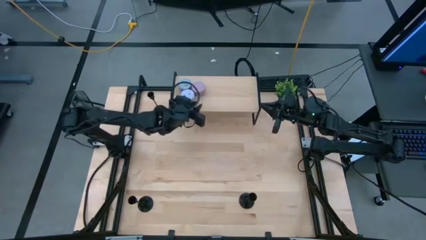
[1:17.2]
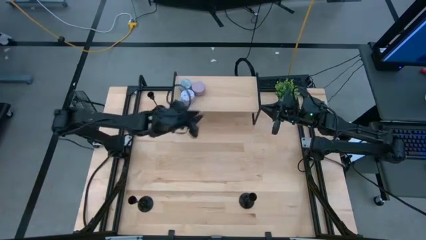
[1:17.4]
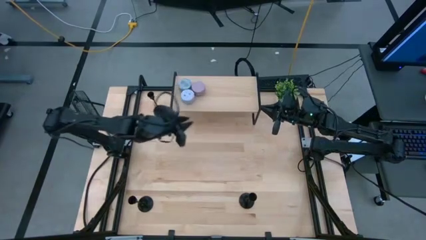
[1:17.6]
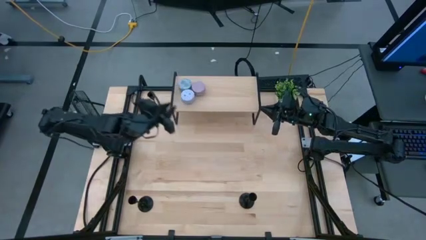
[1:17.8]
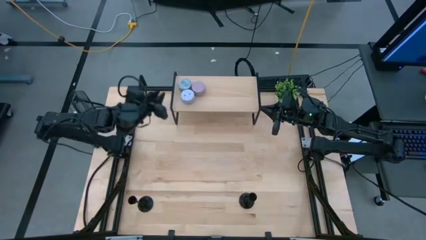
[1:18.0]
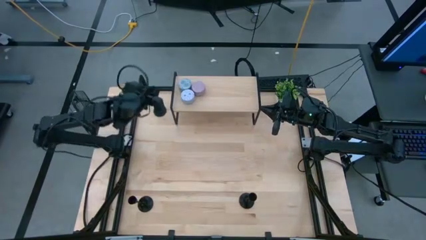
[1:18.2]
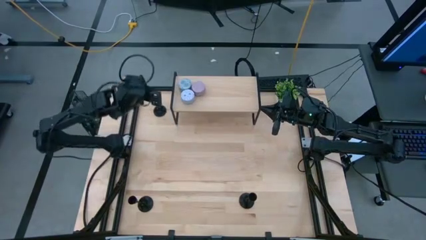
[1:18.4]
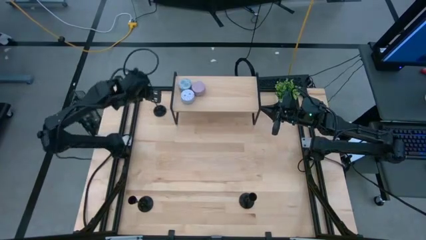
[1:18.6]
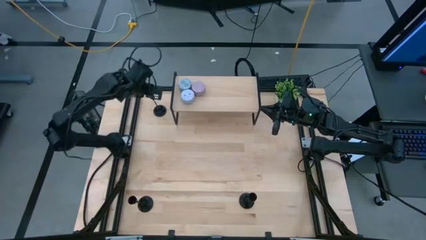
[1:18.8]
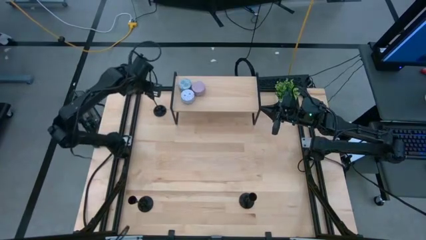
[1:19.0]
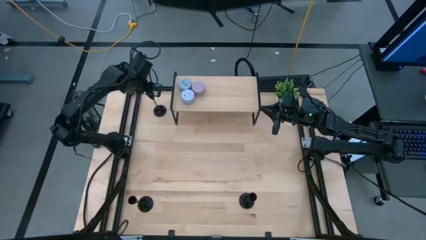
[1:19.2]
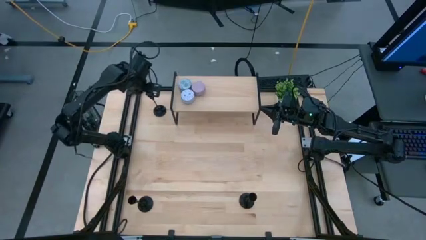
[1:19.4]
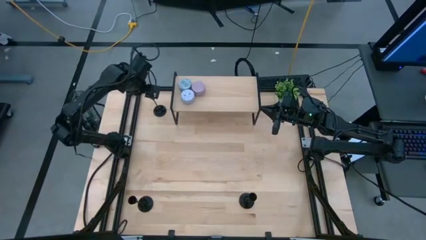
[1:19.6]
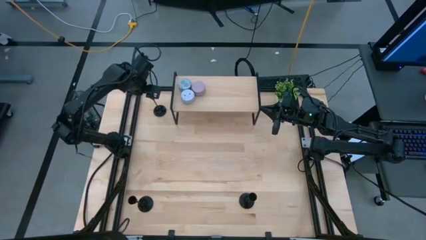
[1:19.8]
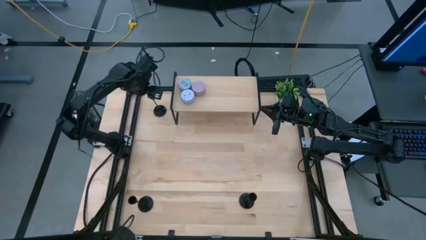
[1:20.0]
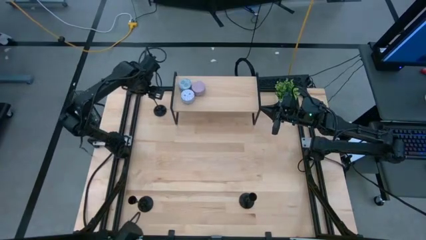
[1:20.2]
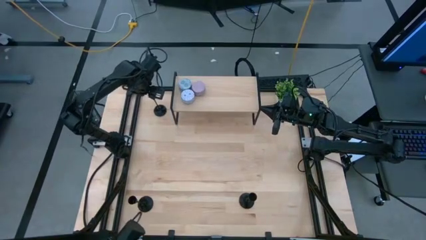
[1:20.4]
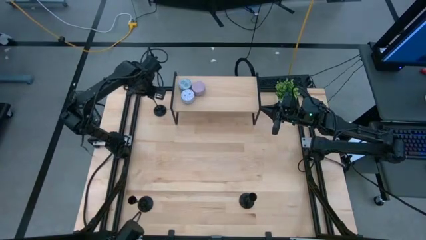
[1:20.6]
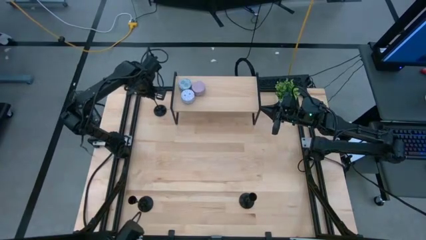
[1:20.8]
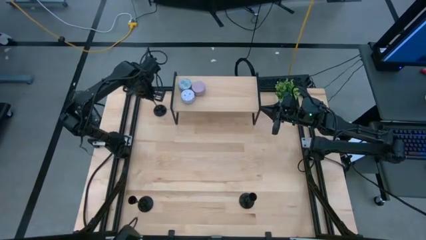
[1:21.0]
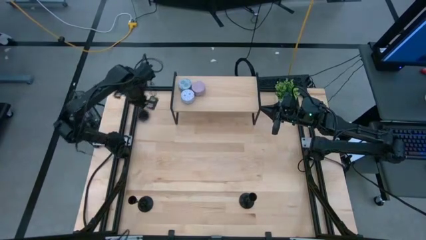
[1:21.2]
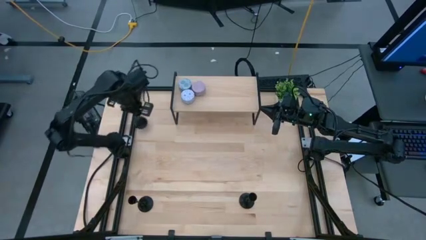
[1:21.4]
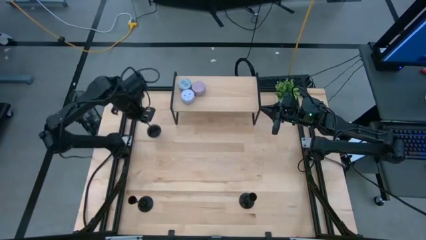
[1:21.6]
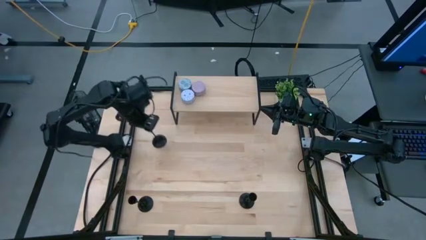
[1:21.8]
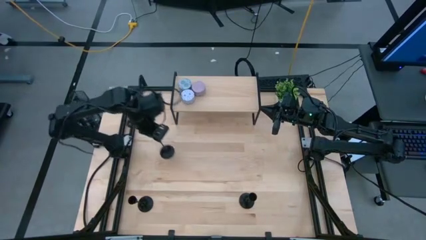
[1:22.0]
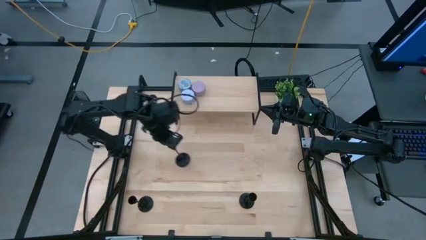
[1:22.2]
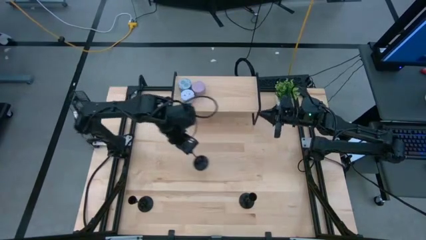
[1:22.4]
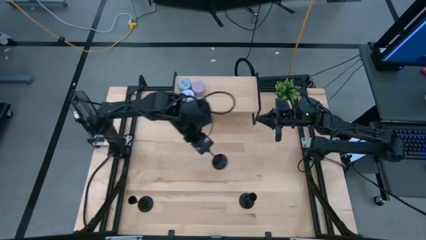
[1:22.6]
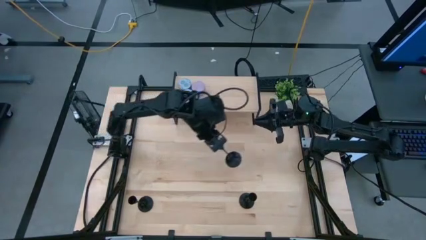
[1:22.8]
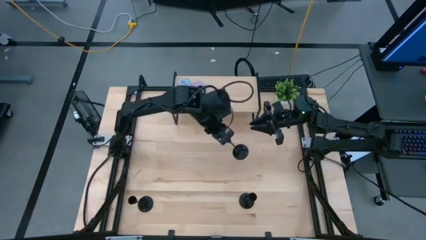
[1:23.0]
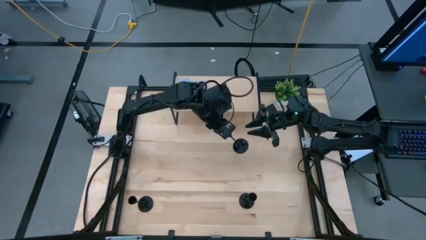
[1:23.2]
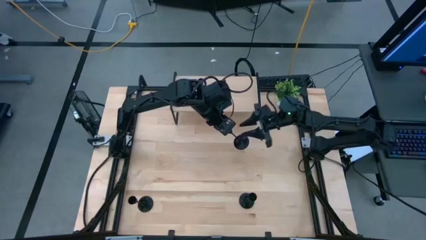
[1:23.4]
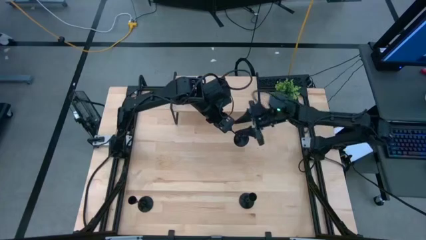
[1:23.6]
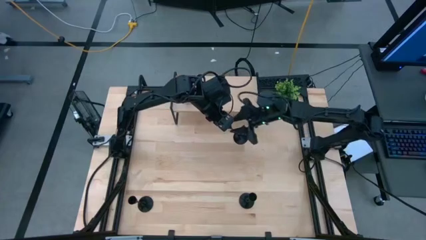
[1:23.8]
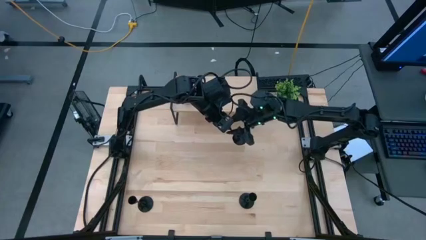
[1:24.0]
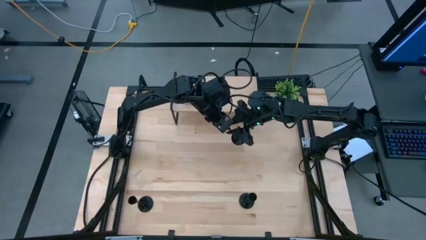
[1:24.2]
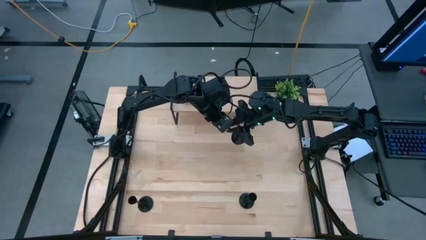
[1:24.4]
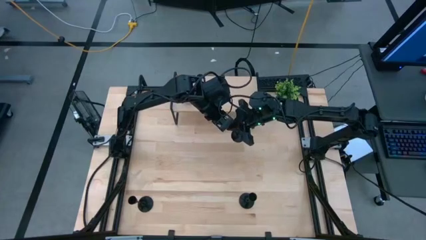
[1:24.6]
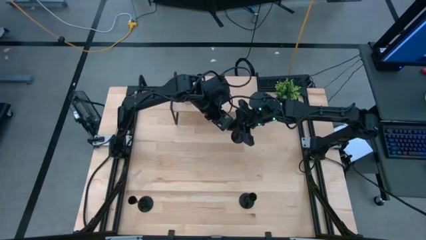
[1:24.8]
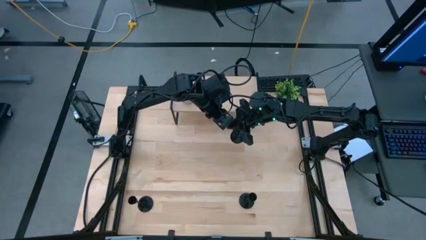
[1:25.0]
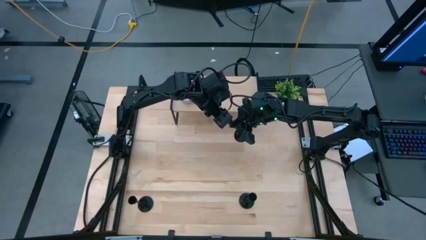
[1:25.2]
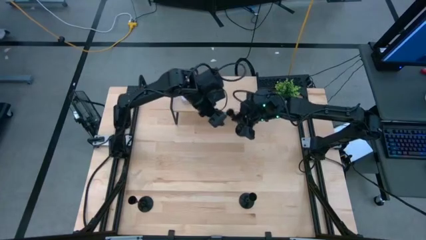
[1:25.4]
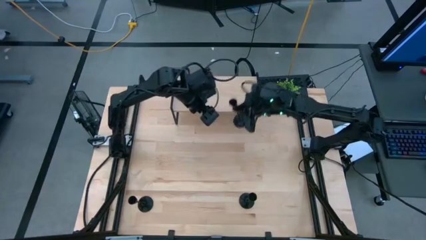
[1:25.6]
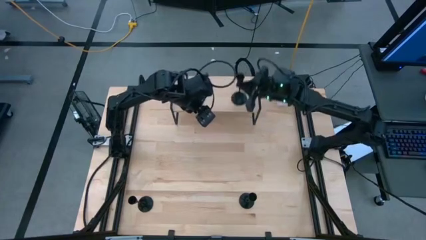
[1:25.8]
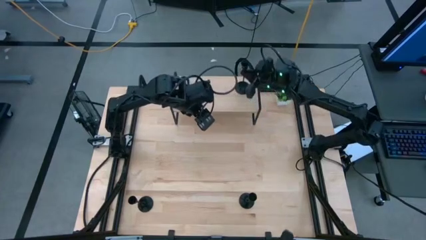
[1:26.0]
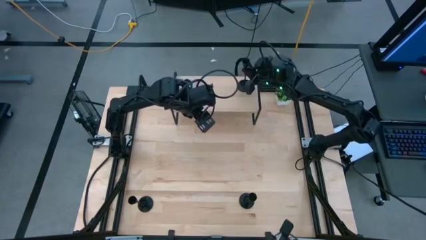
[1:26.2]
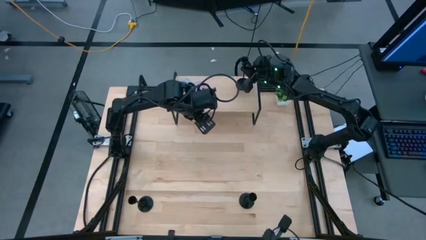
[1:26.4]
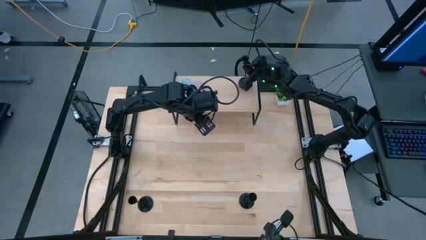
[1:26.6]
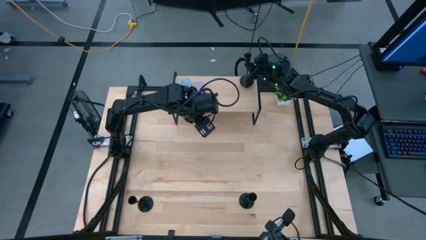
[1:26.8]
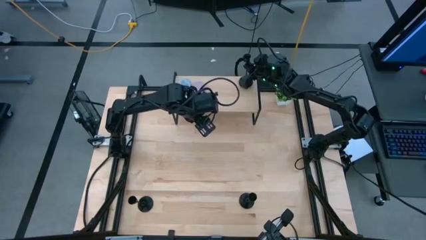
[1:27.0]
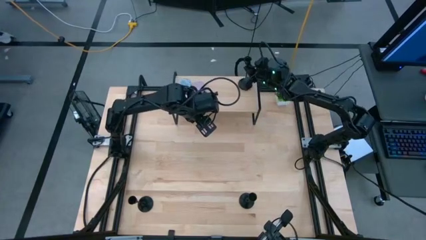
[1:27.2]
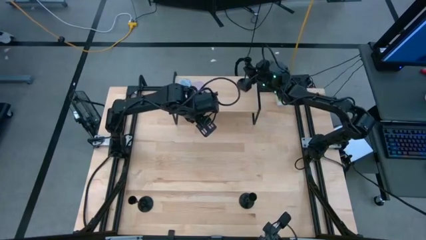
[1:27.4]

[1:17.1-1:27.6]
Task: Pick & Place candle stick holders
Put the top black candle holder on the shelf

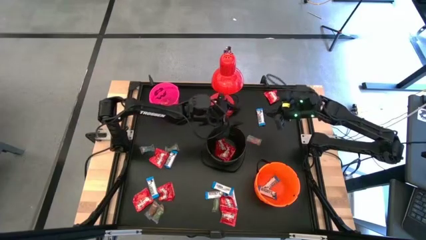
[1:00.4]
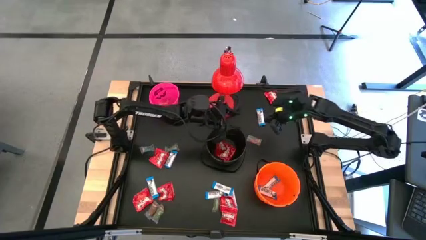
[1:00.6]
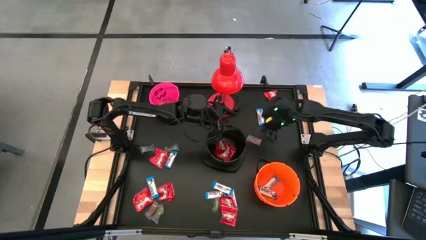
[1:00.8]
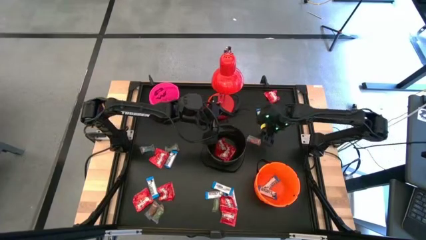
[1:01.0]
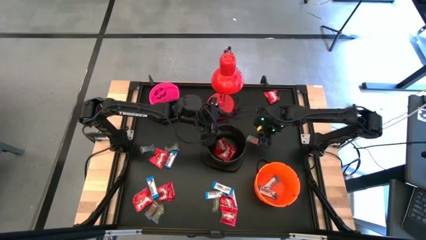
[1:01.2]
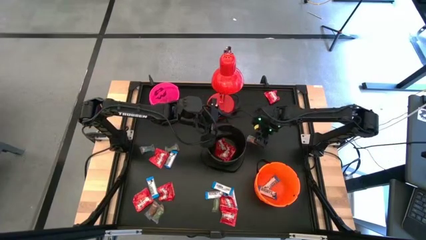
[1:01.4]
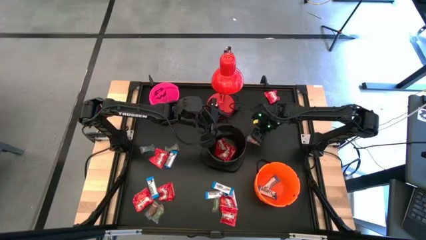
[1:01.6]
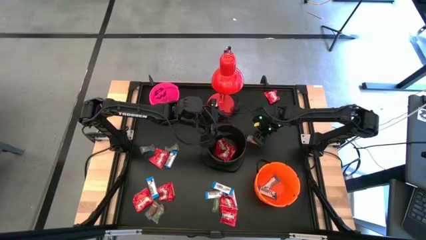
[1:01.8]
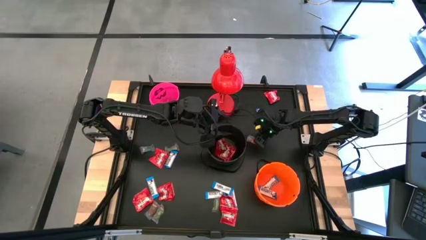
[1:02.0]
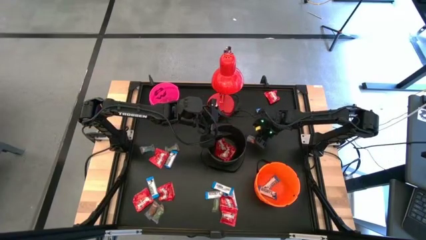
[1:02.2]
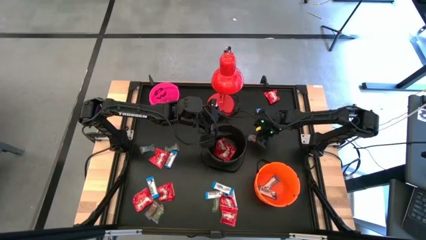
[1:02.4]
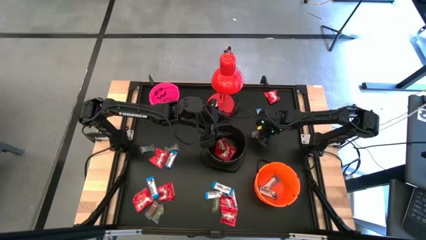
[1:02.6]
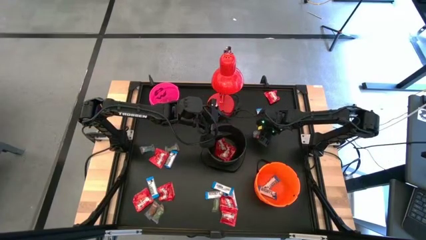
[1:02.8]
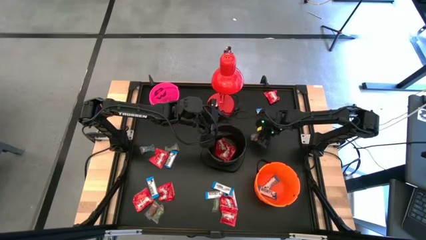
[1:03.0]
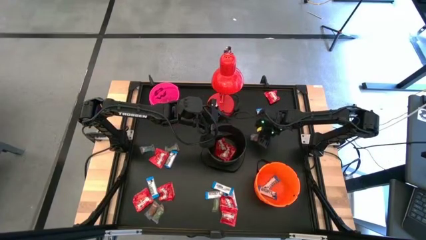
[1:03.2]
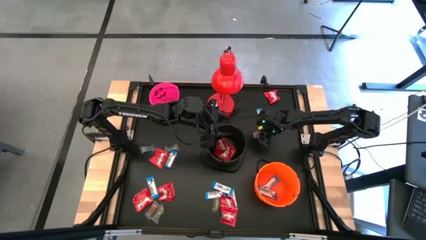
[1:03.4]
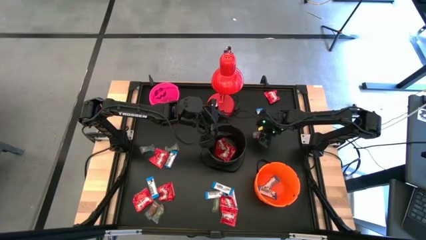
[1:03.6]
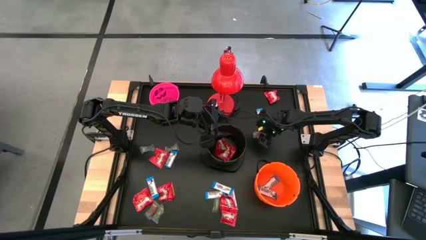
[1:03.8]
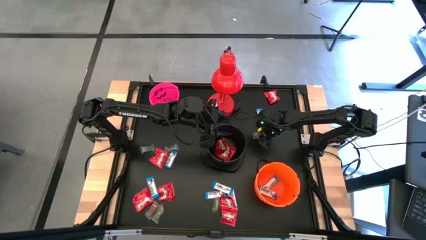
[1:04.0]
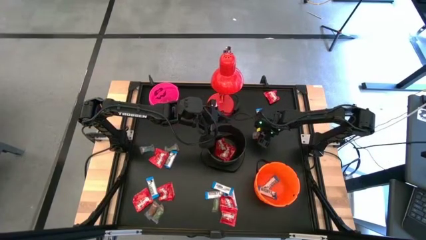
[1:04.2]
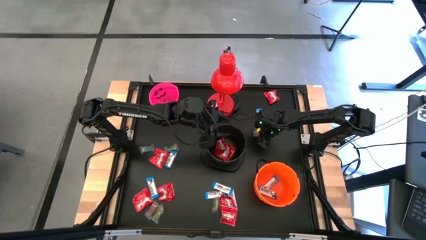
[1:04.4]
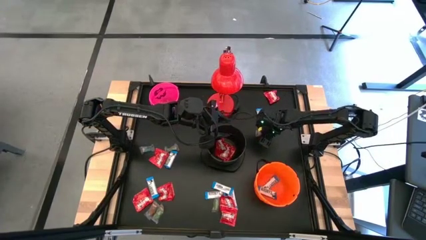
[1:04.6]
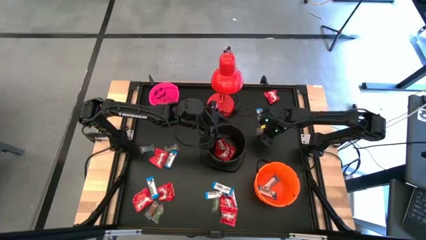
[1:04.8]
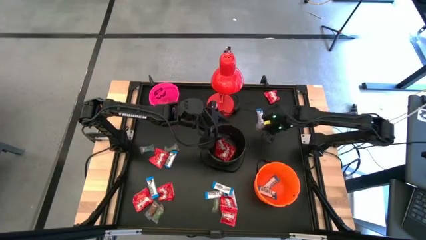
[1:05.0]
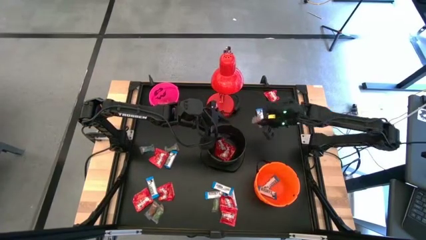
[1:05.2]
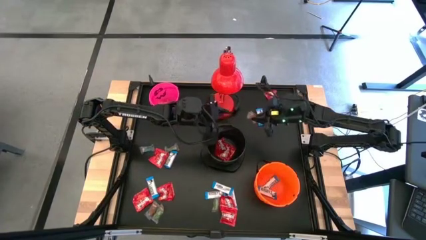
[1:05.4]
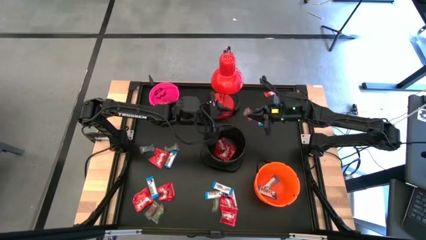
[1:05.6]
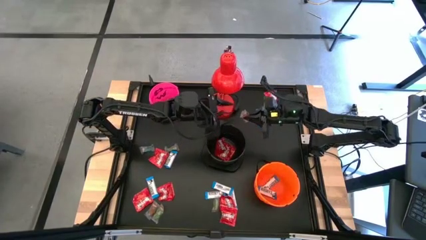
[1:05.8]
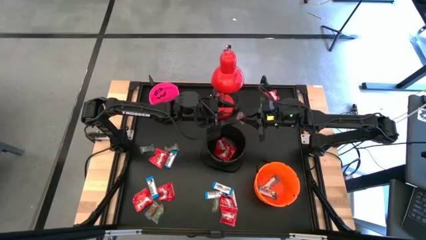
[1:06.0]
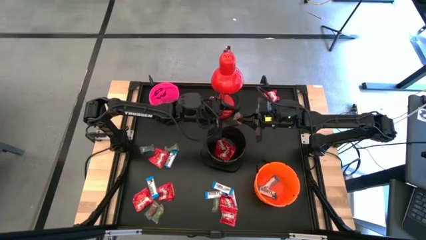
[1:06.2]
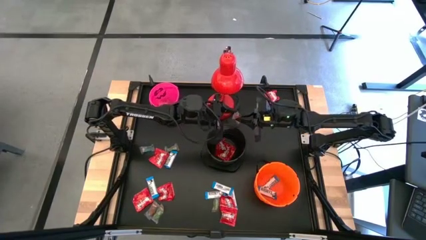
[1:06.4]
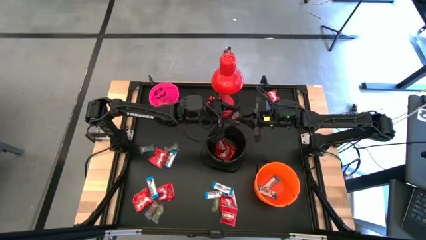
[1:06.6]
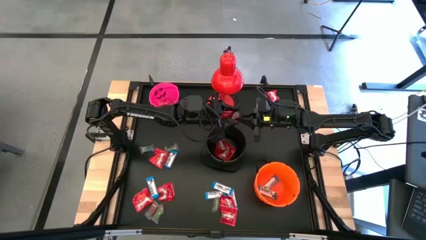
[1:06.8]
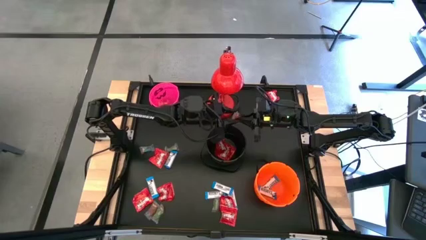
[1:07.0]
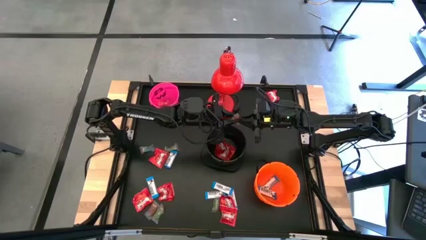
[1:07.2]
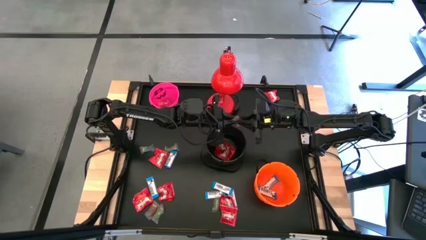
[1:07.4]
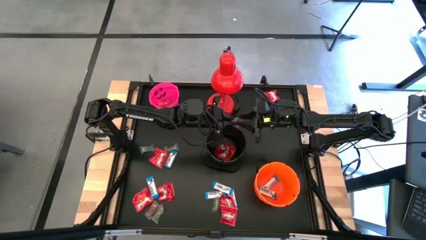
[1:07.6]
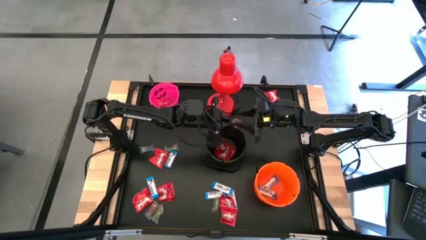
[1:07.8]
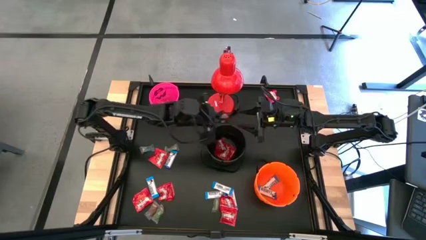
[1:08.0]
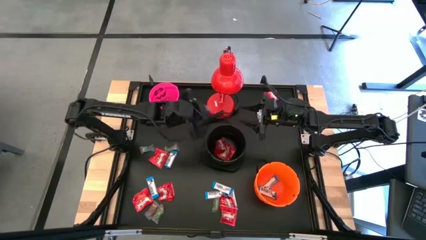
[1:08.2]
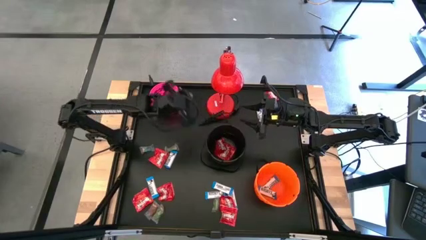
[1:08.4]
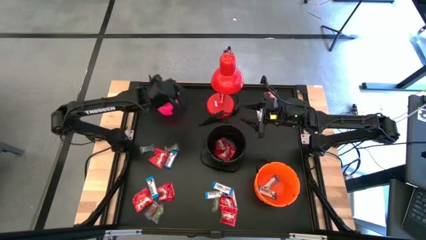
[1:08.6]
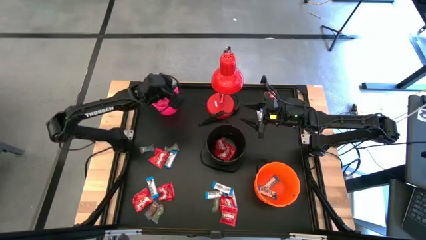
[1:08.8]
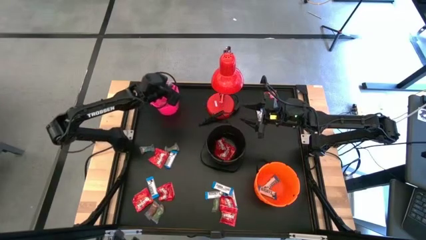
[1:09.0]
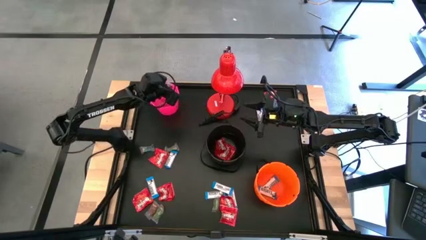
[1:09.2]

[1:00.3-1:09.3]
Task: Organize candy in baskets
Put the orange gummy into the pink bucket
